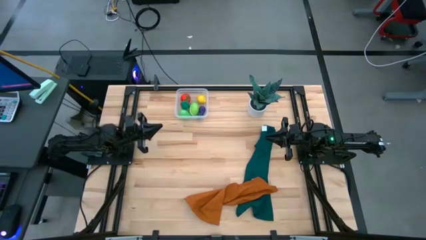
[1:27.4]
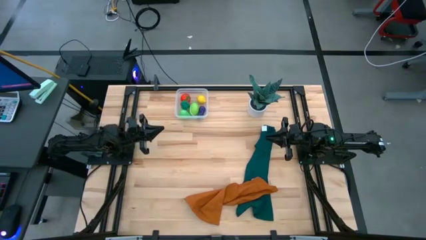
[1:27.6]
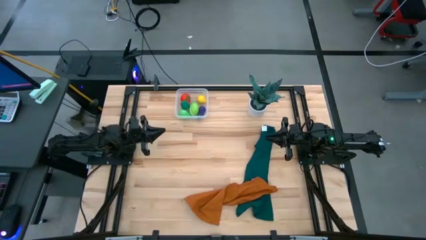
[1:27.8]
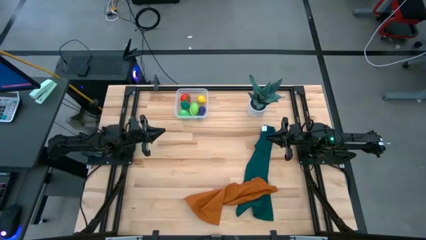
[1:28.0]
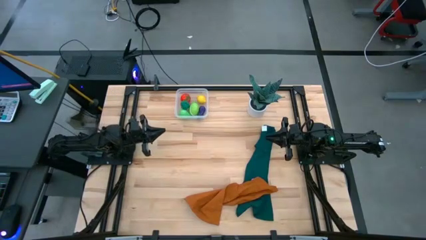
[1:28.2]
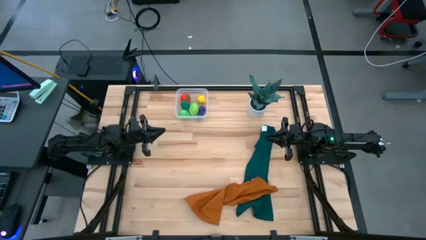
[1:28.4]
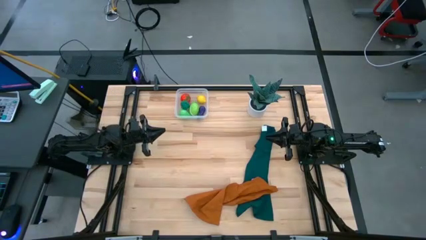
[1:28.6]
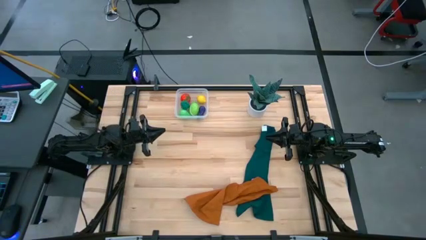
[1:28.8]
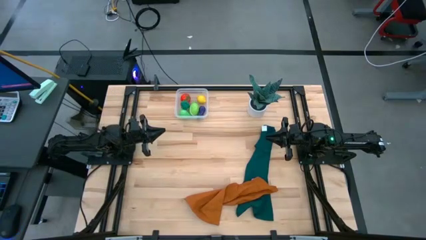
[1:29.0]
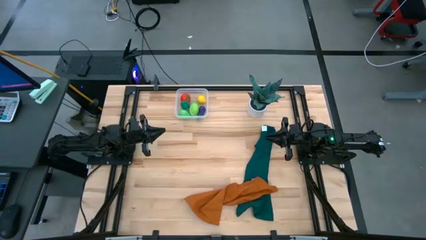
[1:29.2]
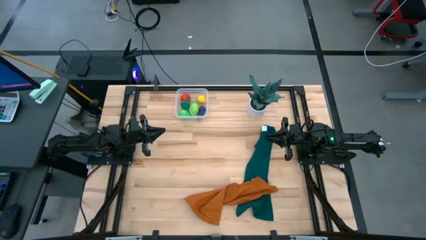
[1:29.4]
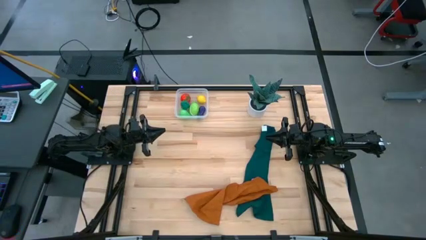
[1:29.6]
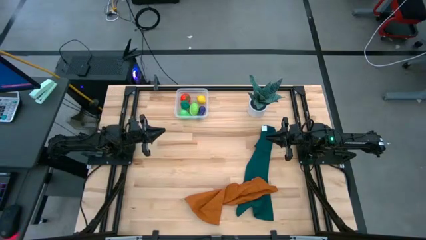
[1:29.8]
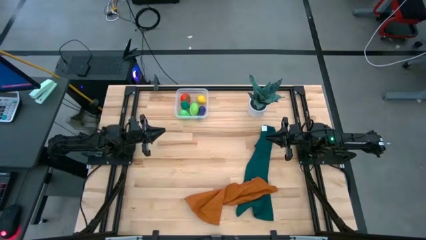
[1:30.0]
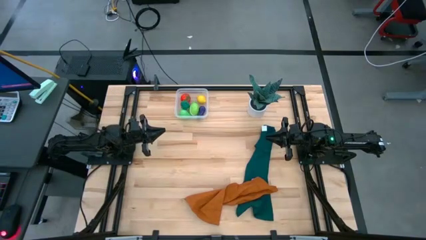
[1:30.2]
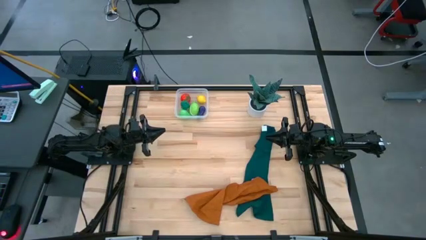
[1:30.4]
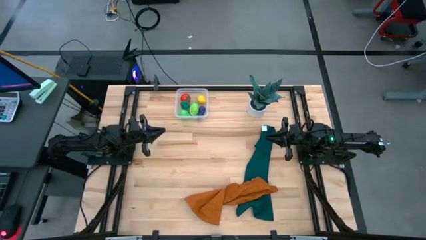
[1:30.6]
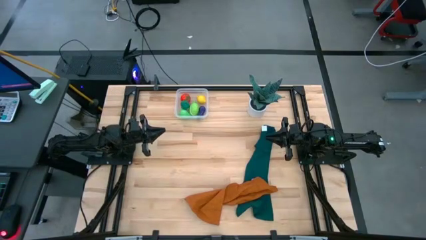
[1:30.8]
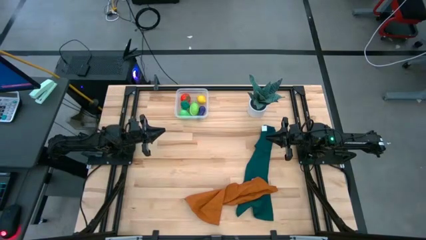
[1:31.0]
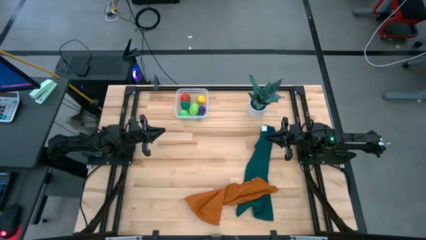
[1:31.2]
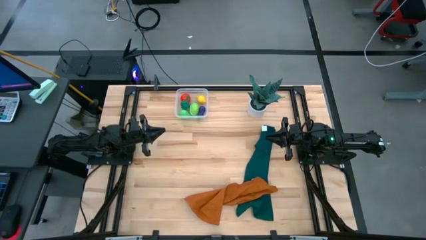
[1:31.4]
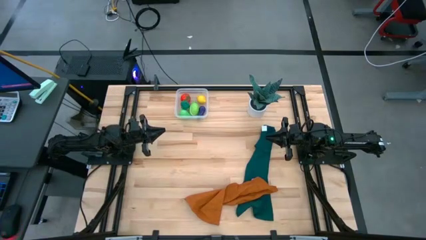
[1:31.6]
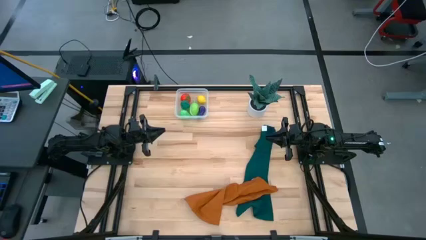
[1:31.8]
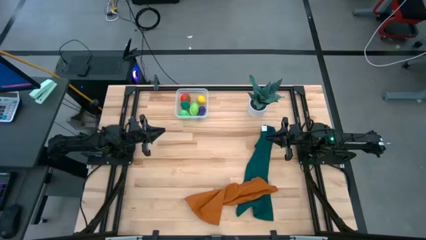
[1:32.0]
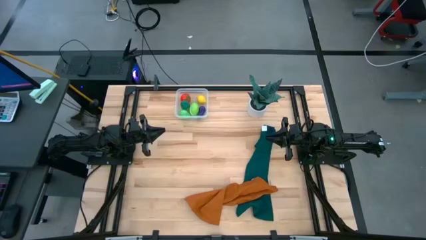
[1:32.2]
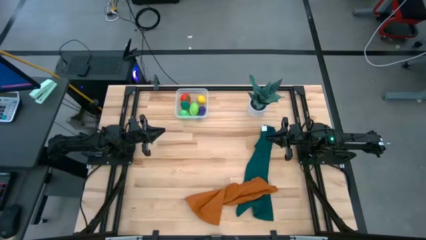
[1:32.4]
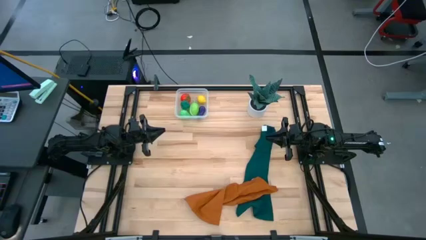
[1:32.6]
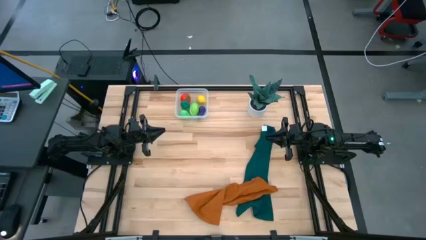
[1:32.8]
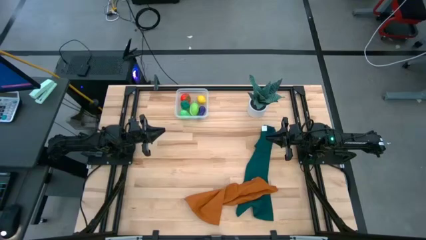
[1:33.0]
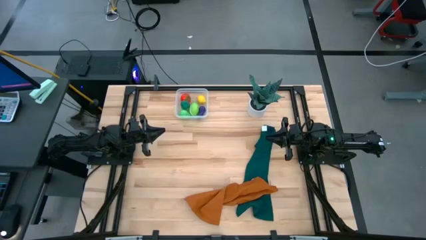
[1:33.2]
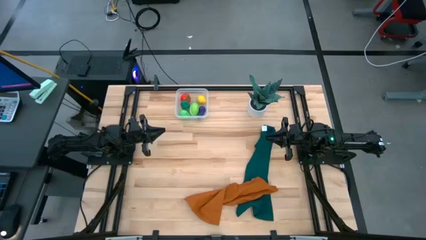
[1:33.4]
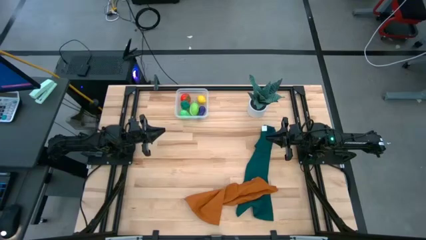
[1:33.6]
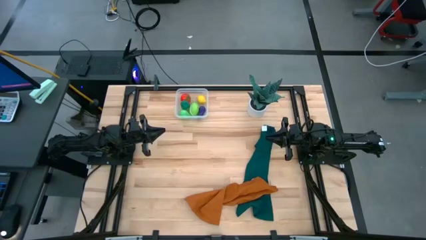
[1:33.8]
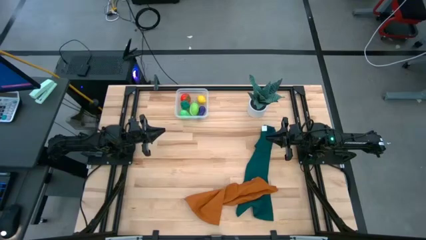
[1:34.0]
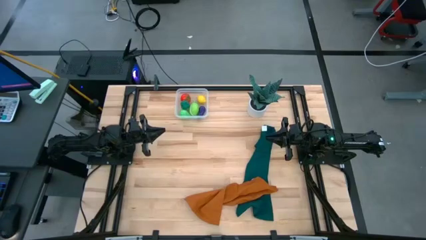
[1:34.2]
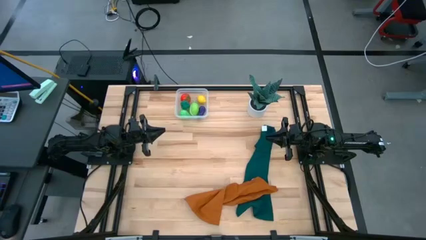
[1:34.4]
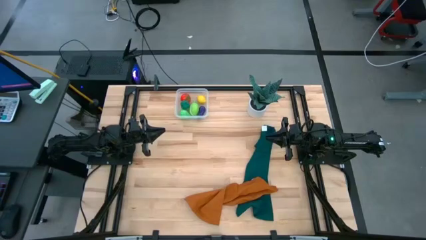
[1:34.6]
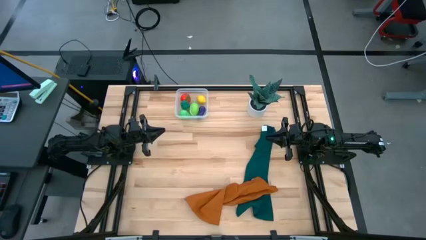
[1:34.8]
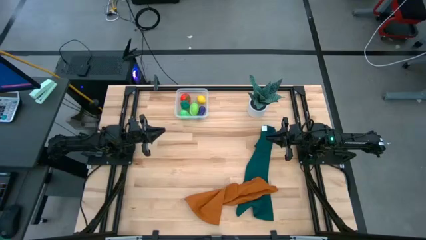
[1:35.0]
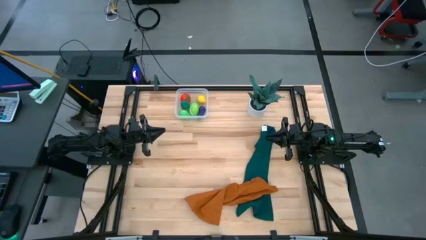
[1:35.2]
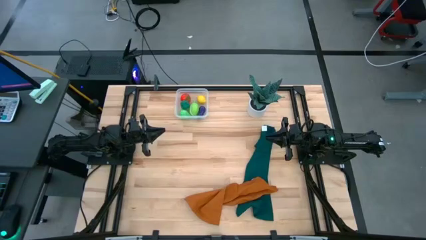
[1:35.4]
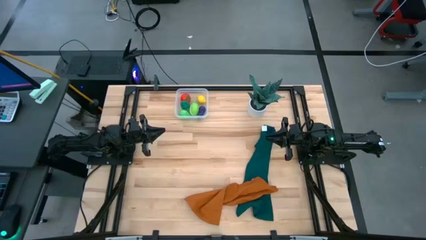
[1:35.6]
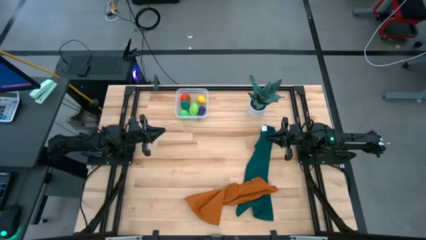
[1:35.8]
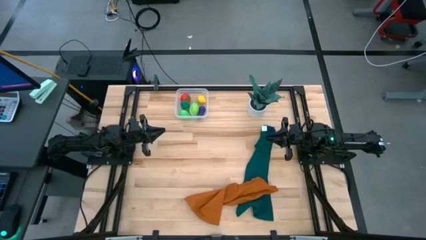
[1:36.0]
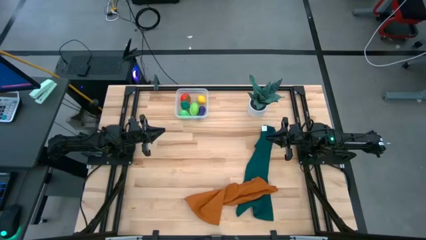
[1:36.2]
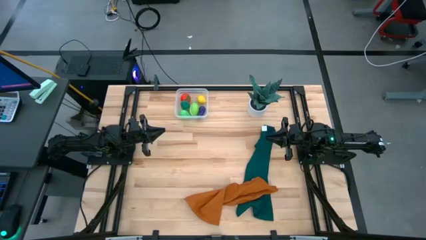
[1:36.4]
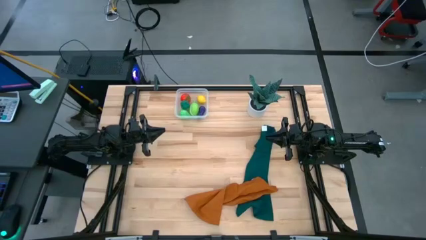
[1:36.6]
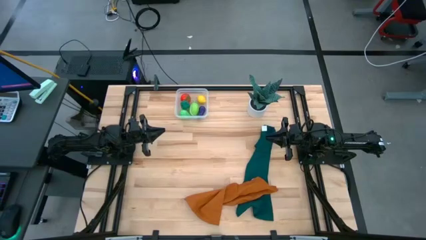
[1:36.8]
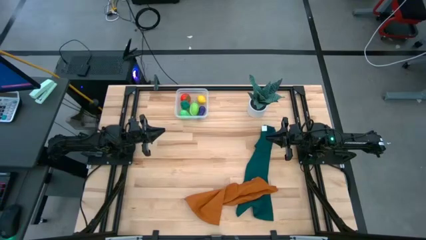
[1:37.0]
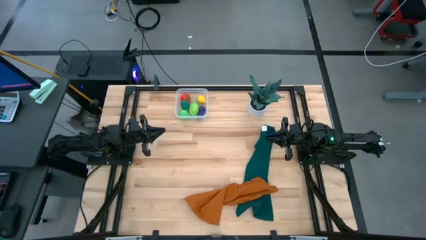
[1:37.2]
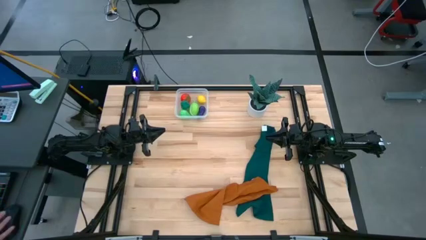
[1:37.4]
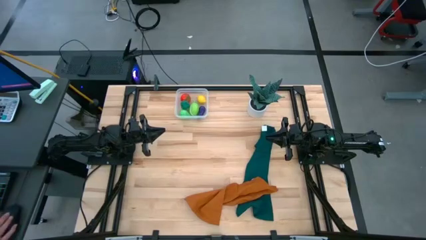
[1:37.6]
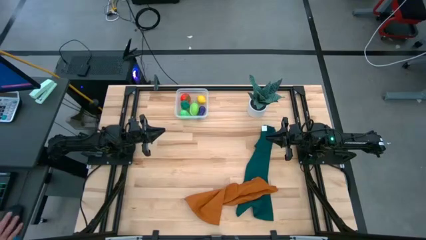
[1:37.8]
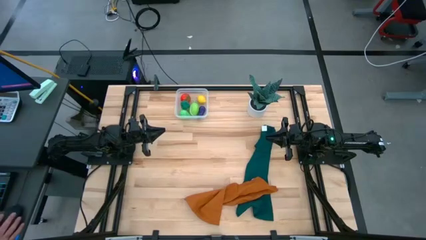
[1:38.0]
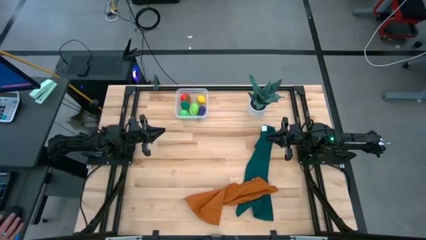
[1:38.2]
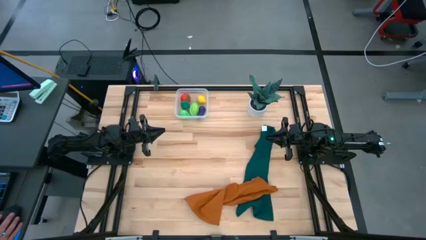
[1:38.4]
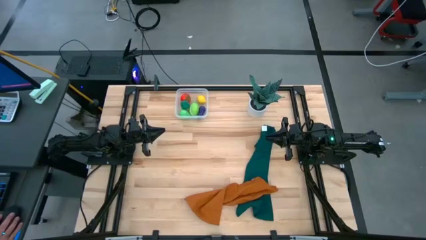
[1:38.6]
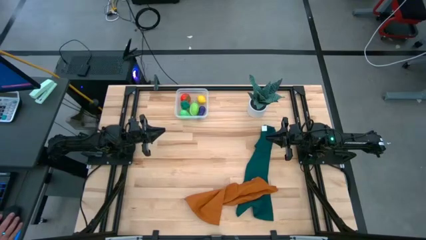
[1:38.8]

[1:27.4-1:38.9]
Task: Pick and placing Produce into tupperware
Return to Home Position

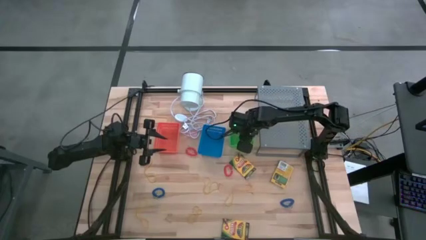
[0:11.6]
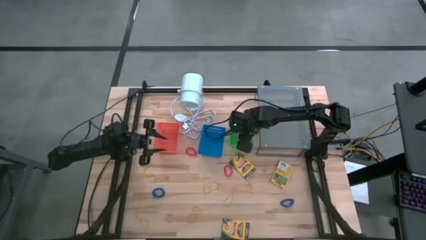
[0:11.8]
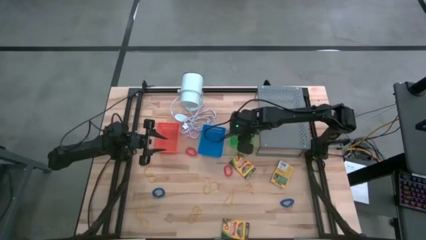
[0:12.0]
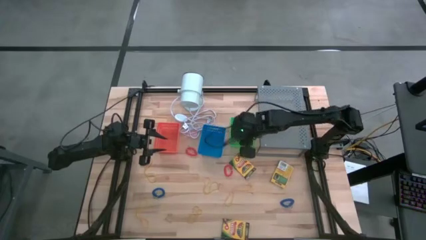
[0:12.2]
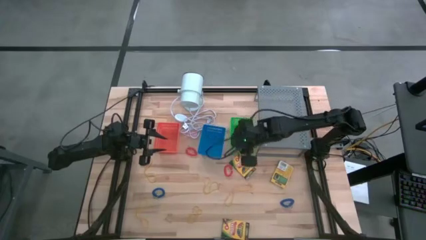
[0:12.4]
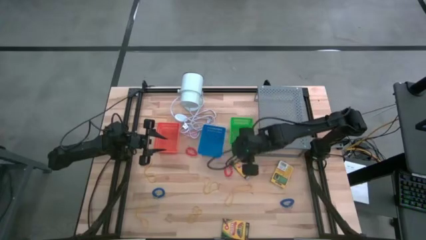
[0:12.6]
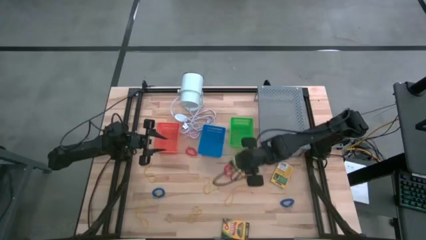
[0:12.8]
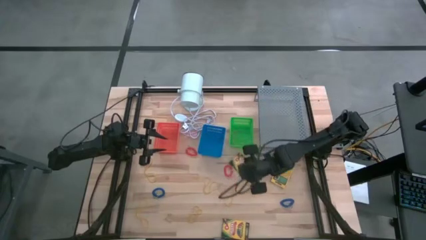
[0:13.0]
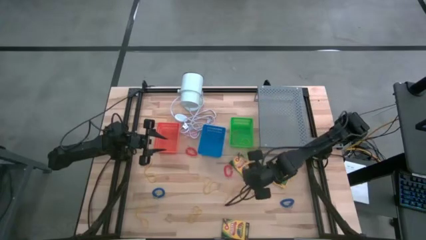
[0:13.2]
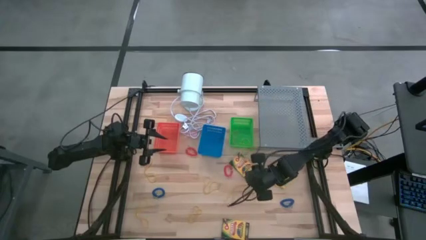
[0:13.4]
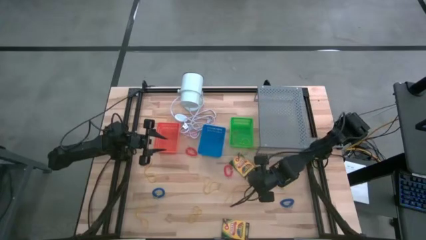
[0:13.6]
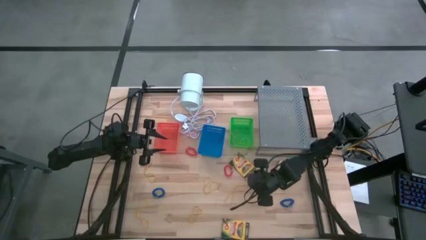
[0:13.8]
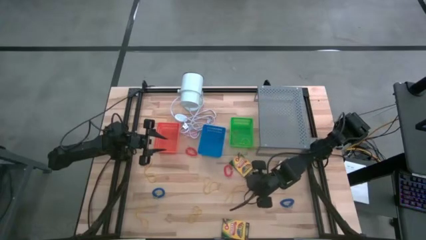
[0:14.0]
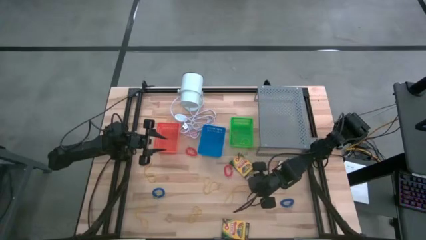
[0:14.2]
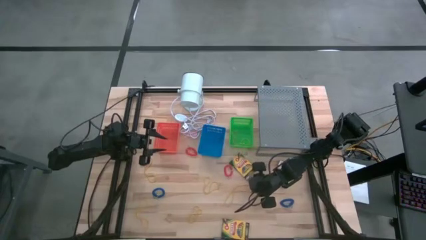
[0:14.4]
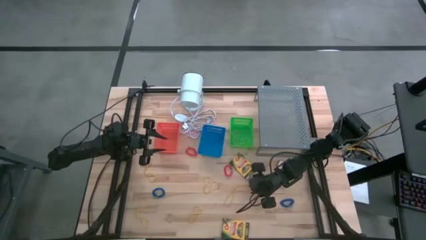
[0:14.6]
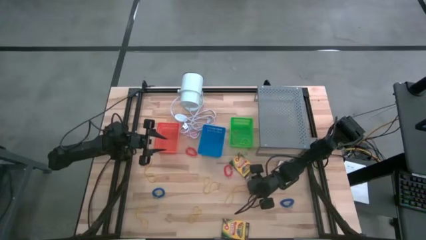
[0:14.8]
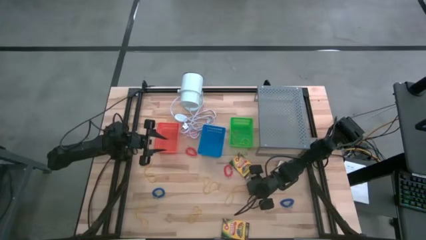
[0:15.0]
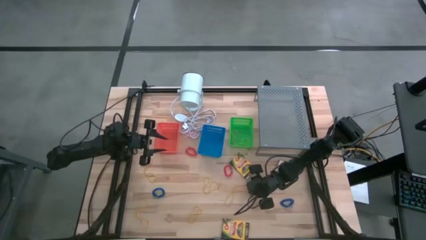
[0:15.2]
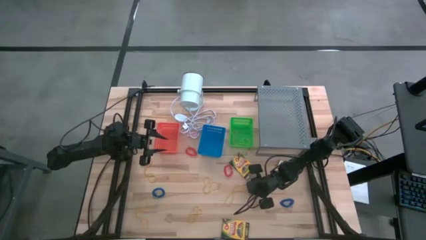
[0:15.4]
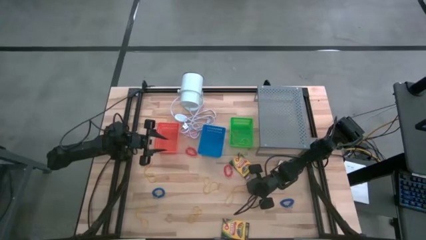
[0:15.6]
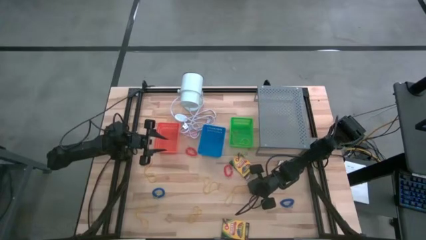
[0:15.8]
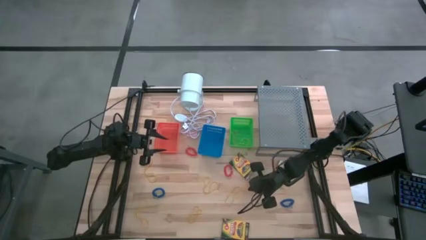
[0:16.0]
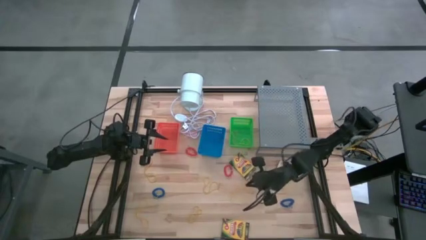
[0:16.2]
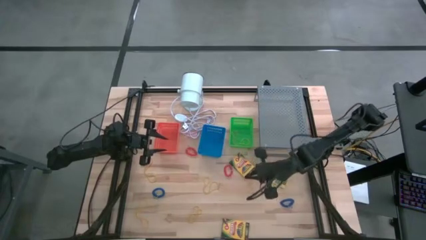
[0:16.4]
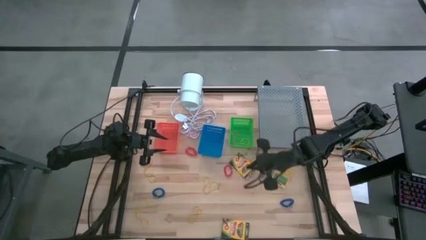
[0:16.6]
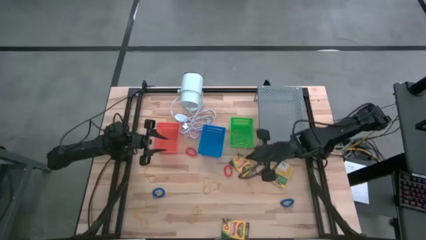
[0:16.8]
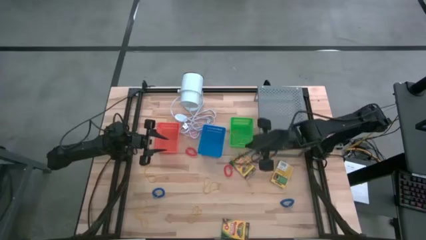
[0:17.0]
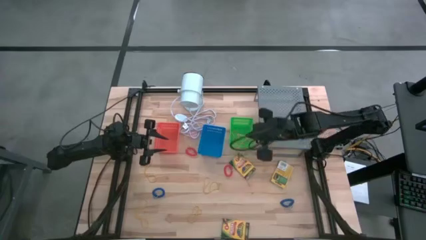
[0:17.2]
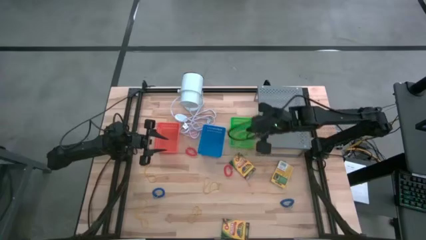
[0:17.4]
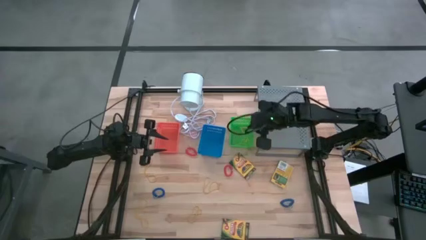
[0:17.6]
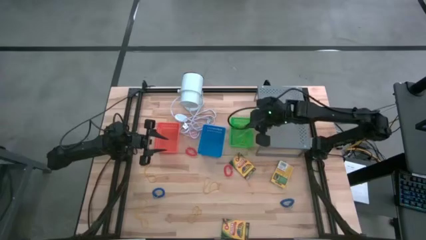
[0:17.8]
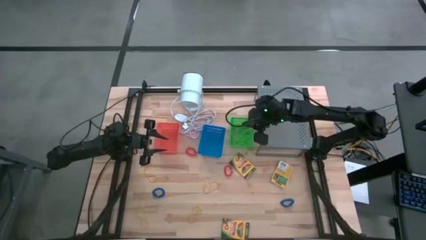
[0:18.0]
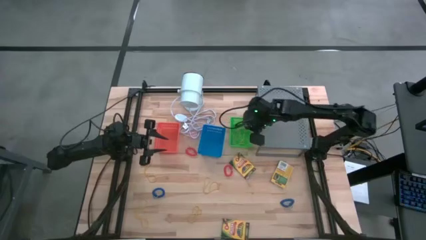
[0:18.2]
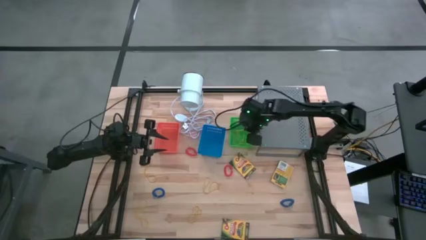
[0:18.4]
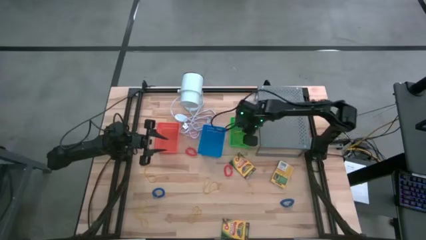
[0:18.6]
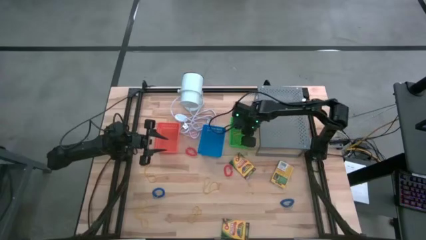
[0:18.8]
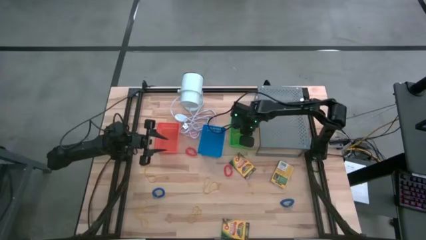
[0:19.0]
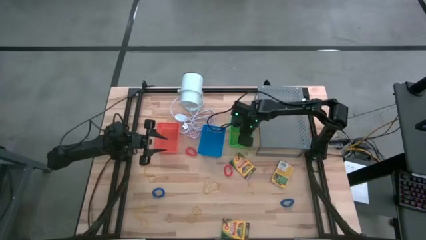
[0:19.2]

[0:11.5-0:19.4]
Task: Pick & Place Office Desk Supplies
Put the yellow rubber band into the green bin
